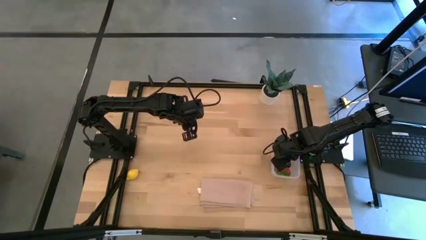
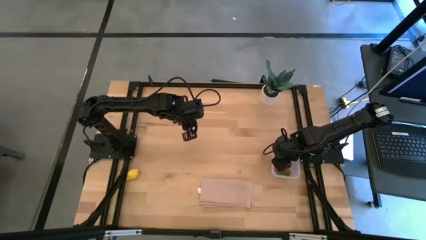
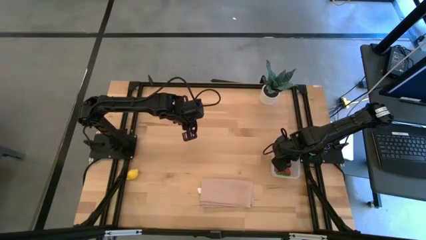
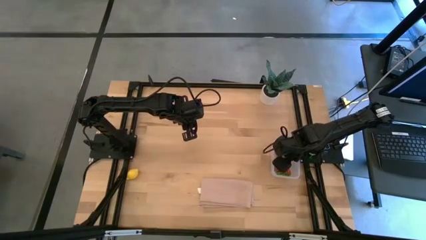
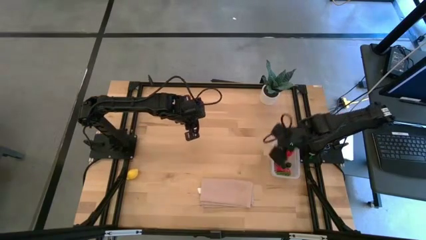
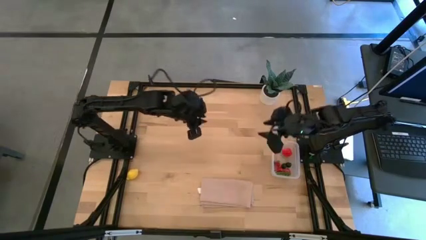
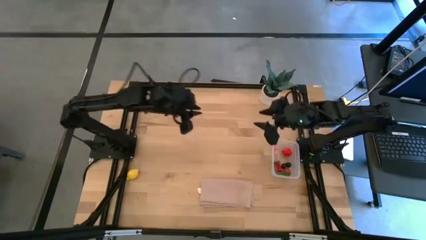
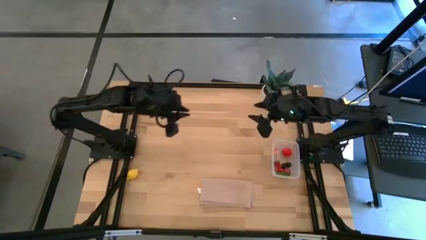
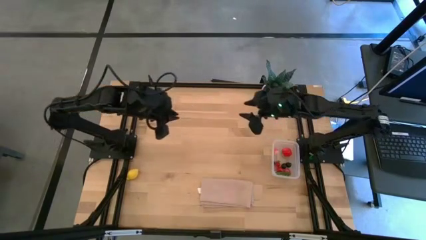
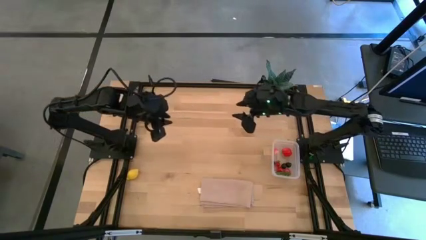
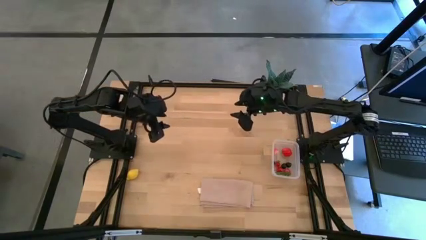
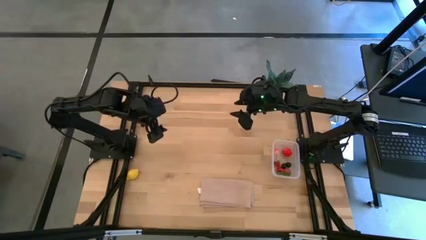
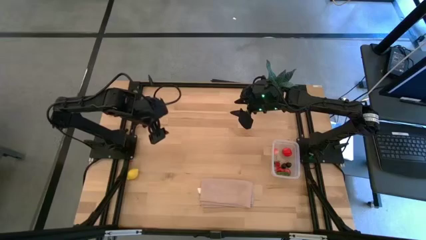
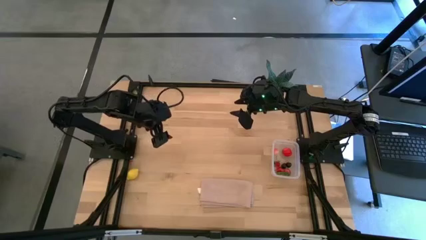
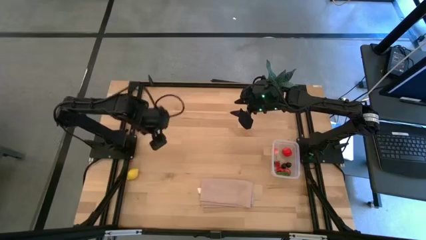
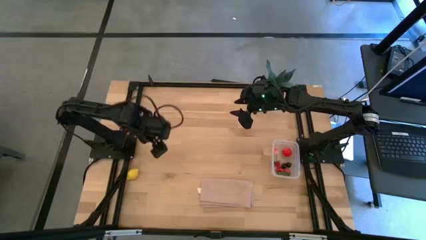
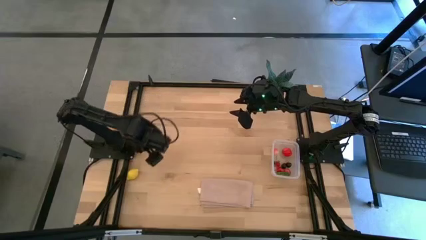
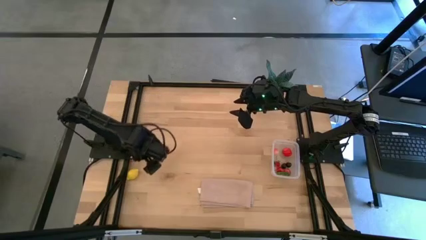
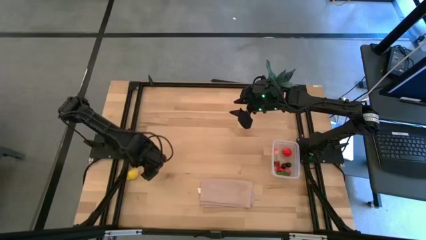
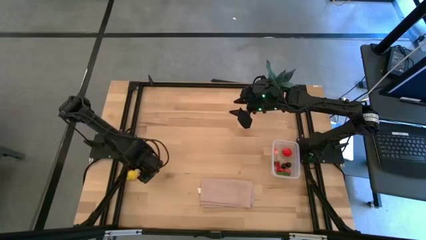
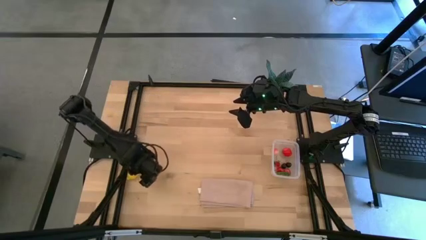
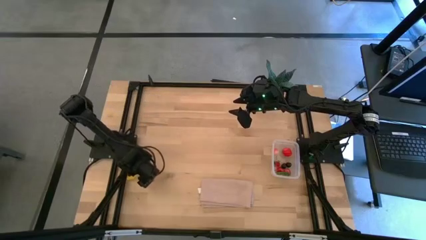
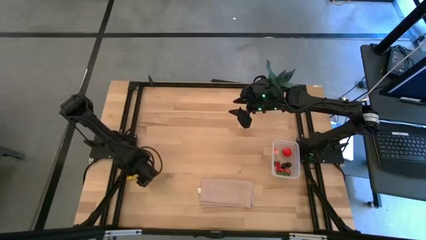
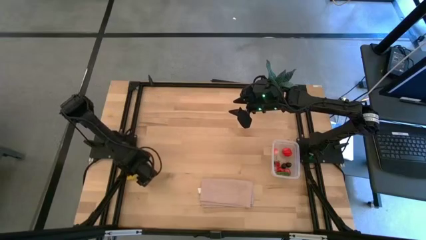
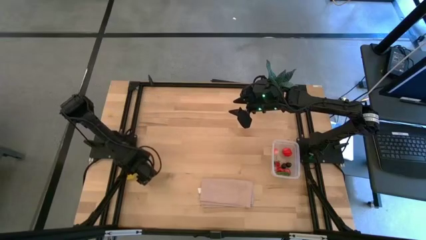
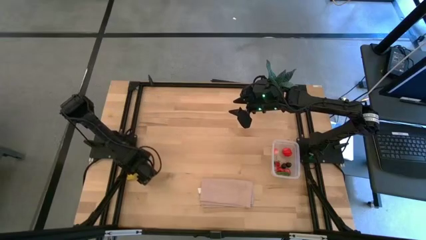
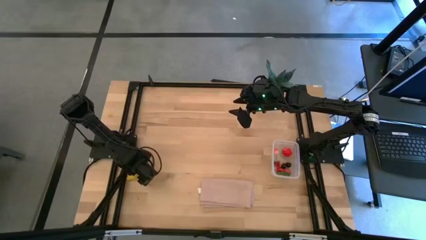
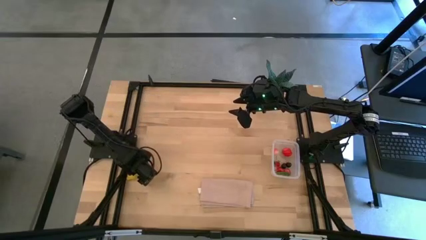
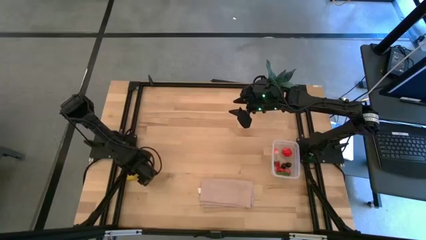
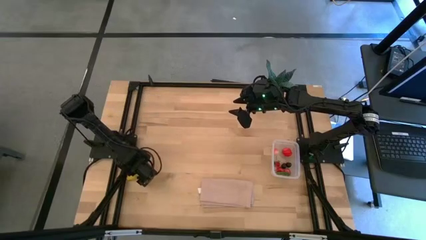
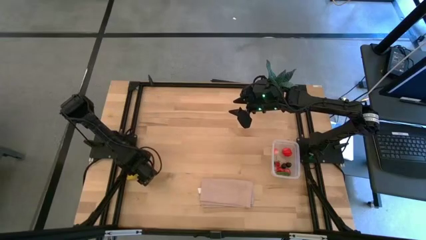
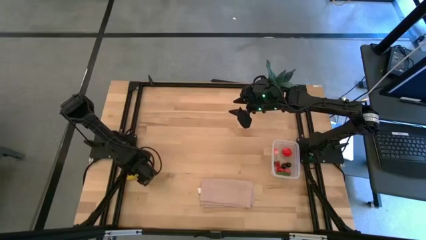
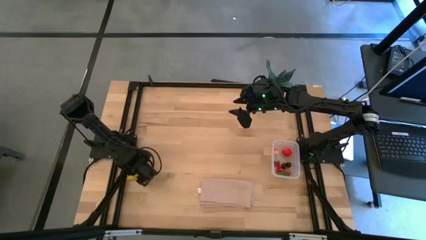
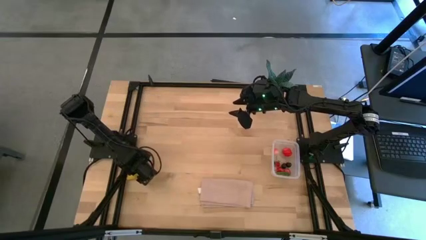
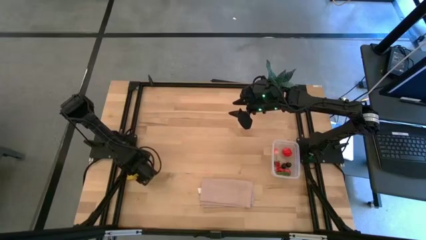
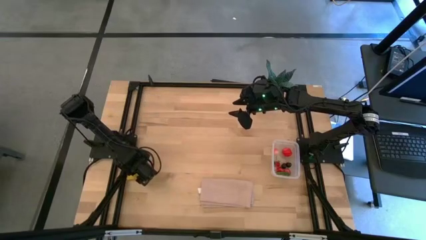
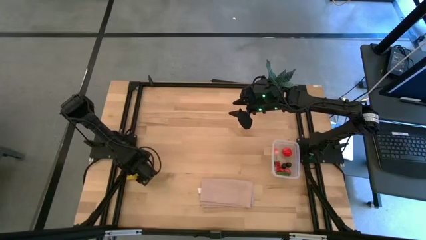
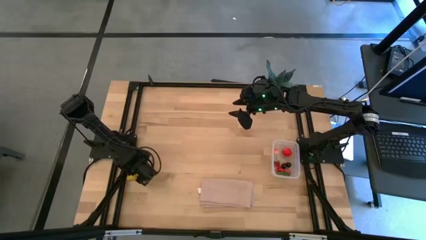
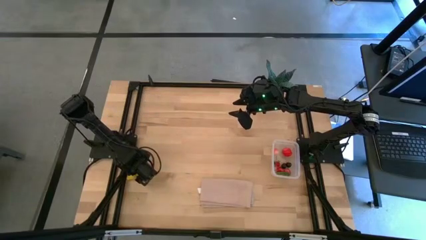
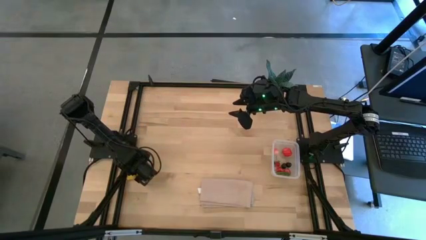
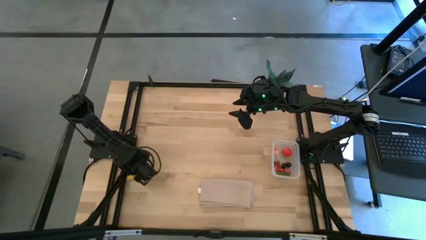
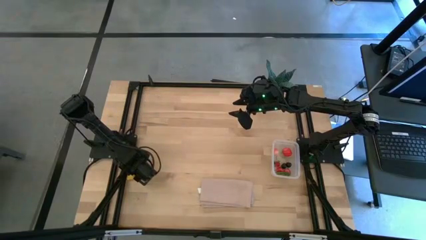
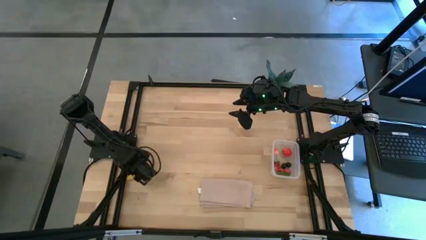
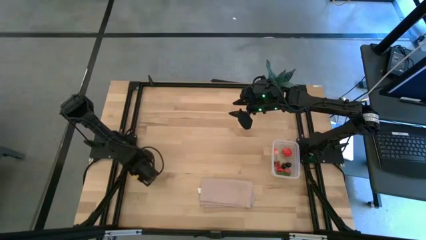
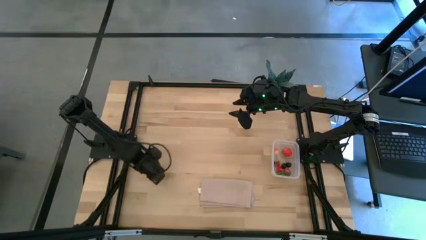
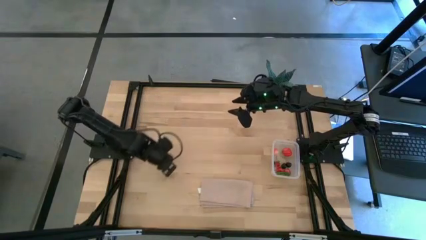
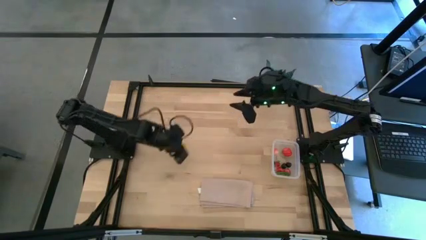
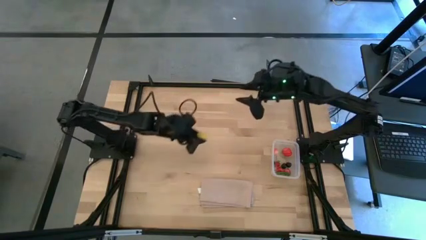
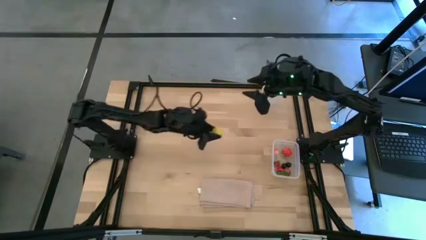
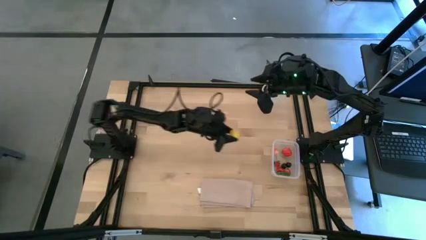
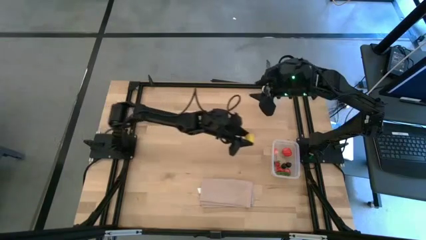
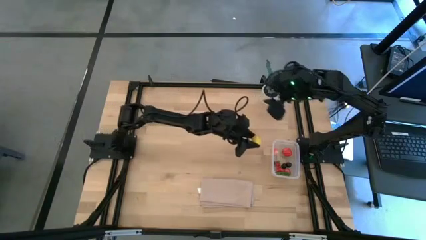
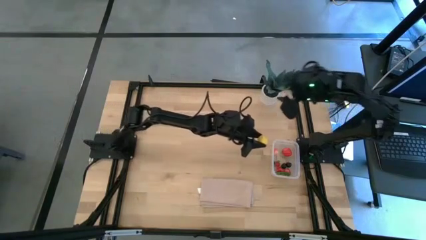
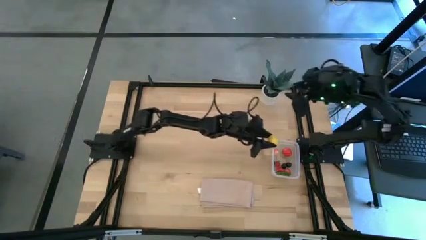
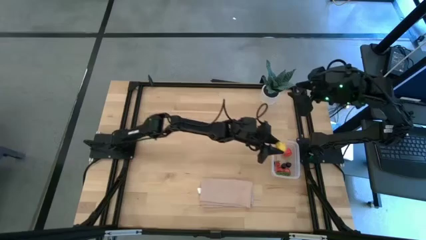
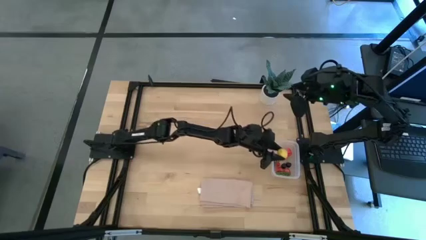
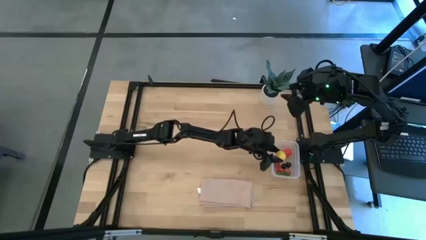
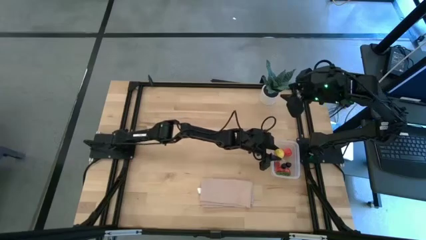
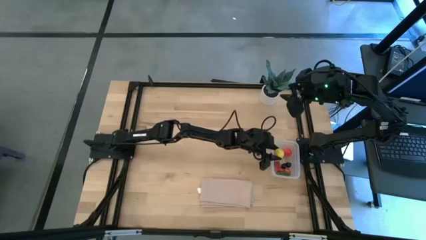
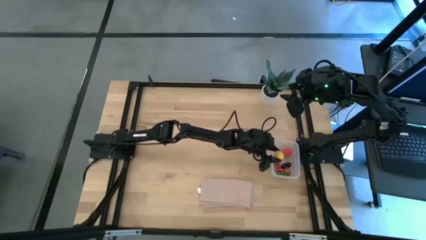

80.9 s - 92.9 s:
Task: Pick and placing Produce into tupperware
Put the yellow lemon into the transparent bin

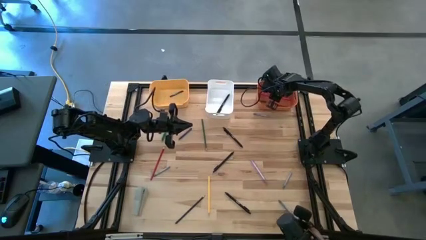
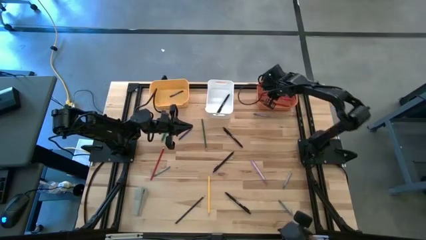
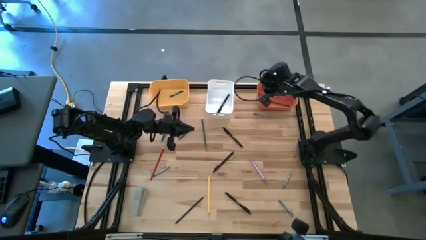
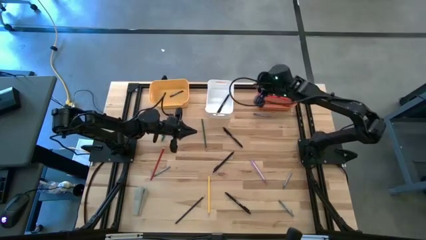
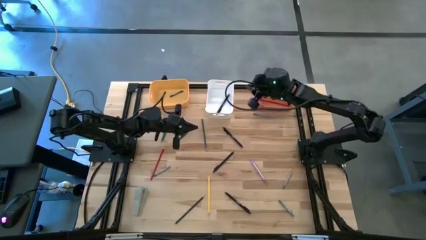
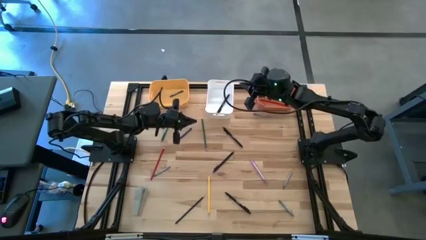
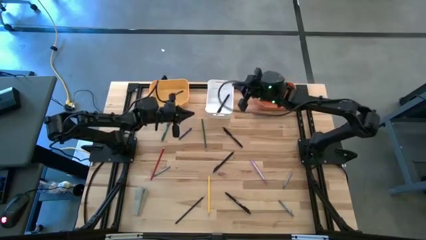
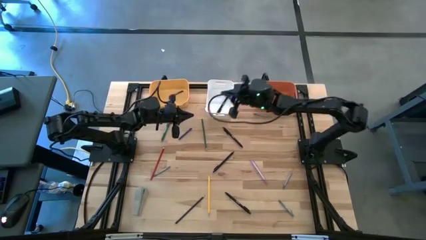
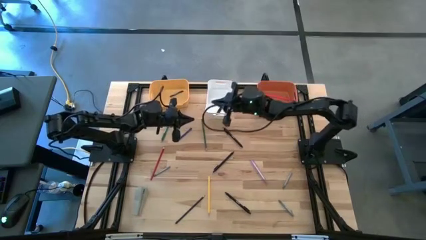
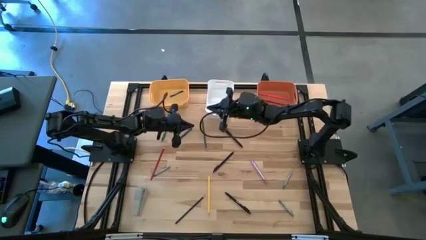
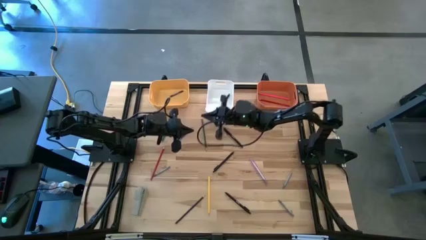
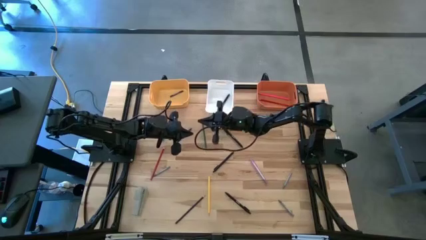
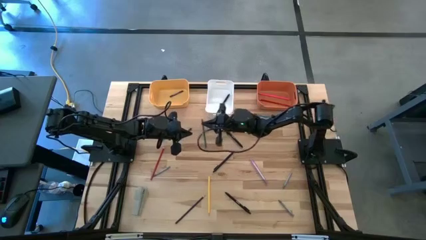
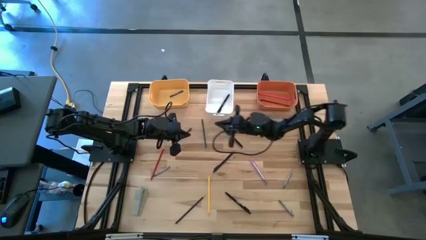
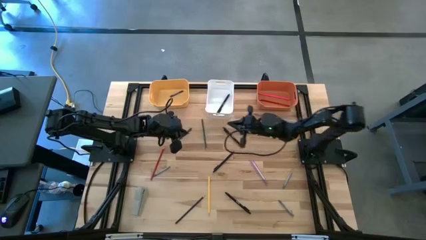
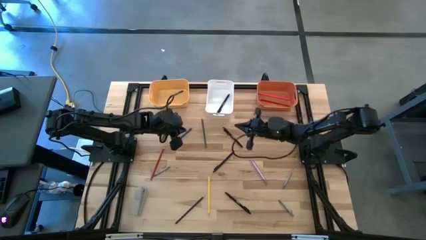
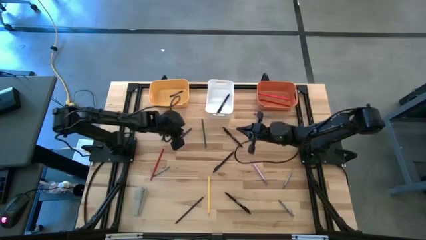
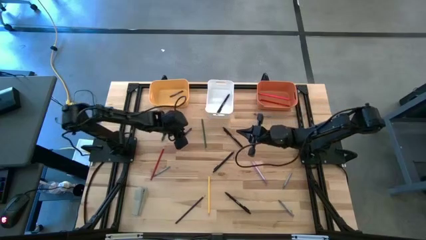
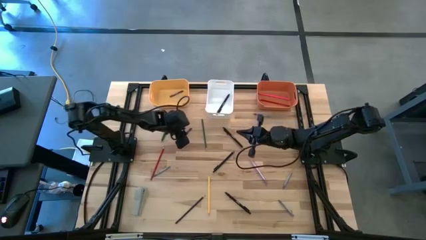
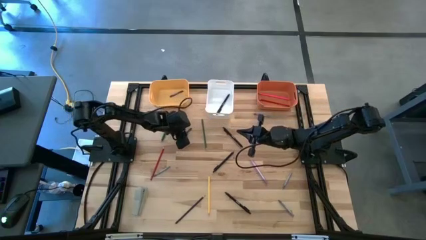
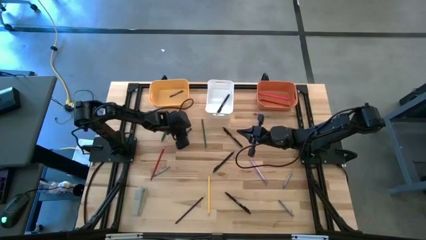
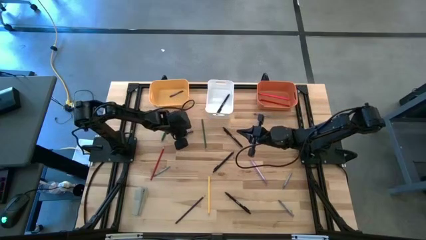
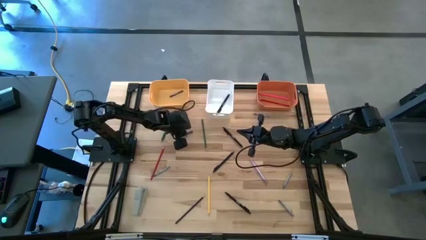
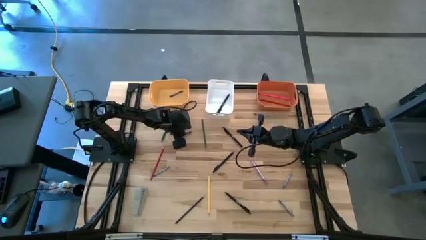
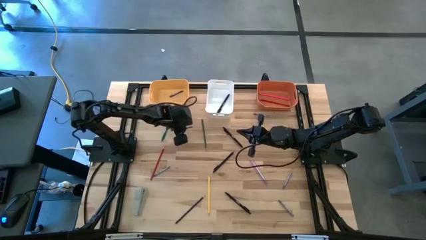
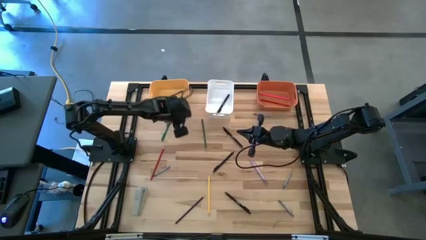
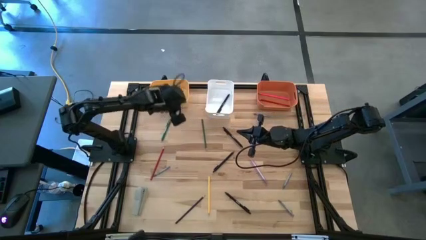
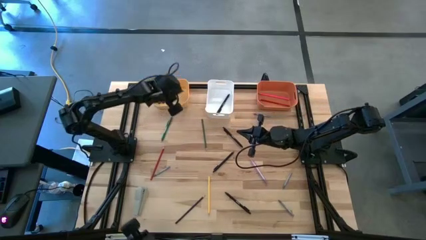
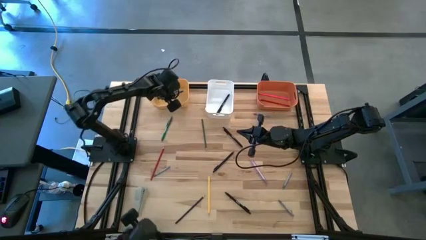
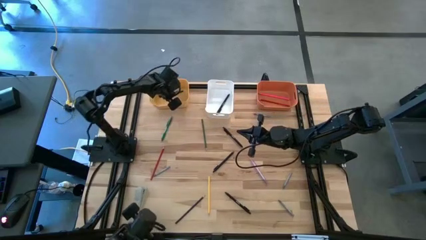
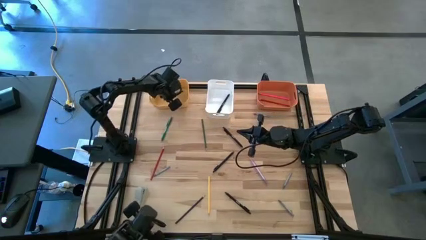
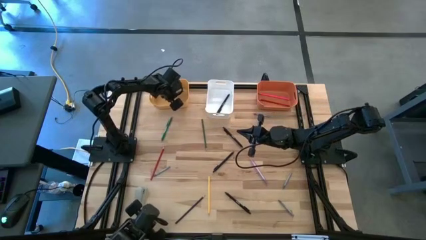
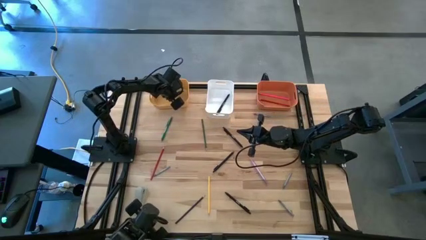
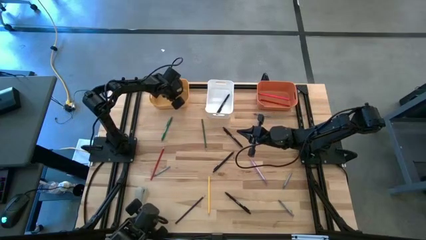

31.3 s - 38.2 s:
Task: Sort crayons/erasers/pens/pencils in bins
Put the blue crayon into the yellow bin
